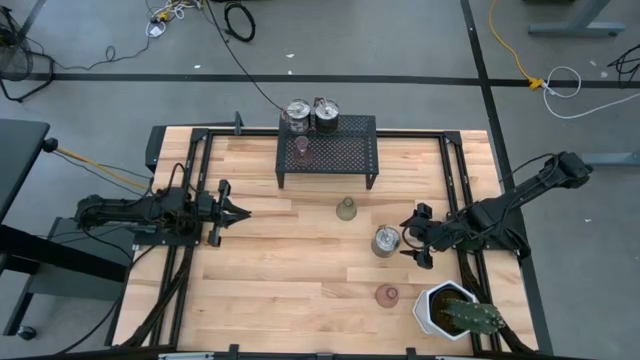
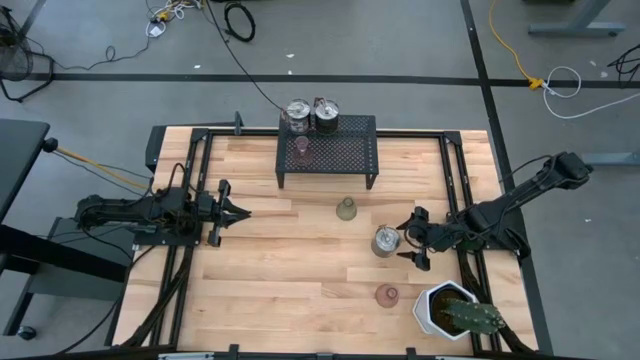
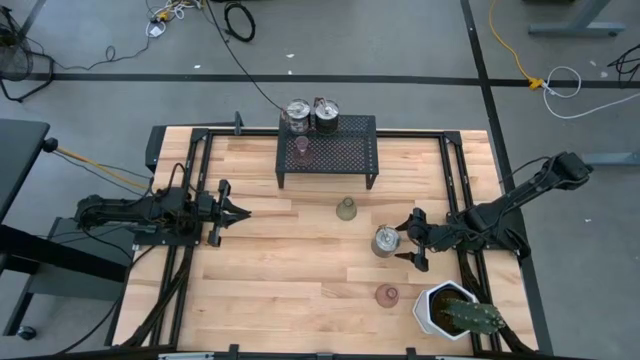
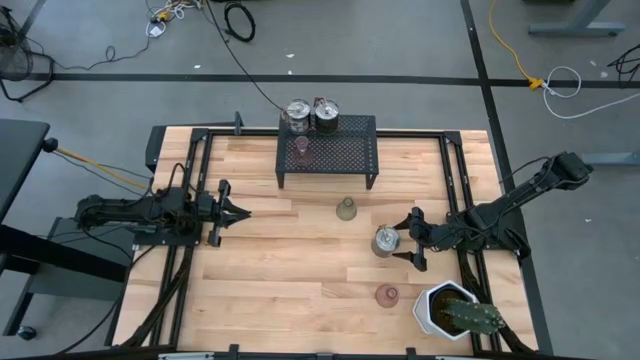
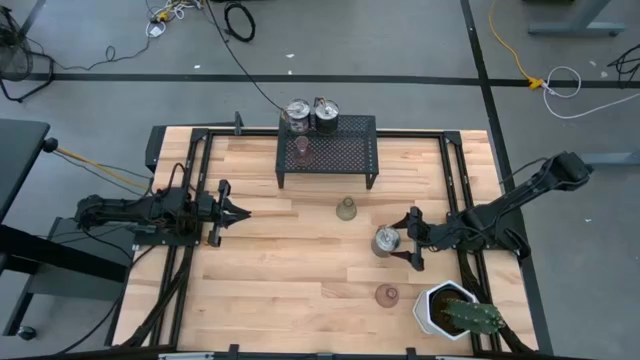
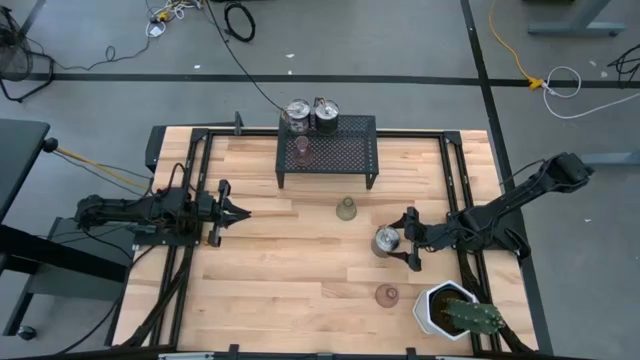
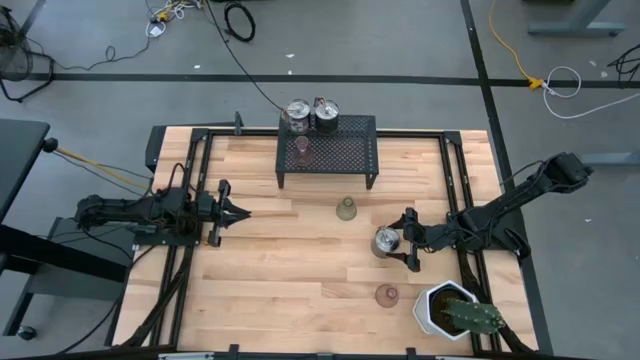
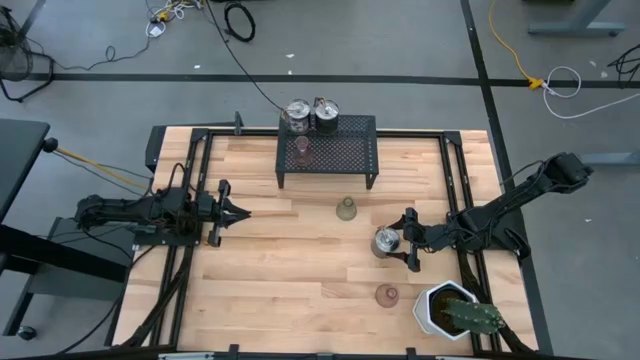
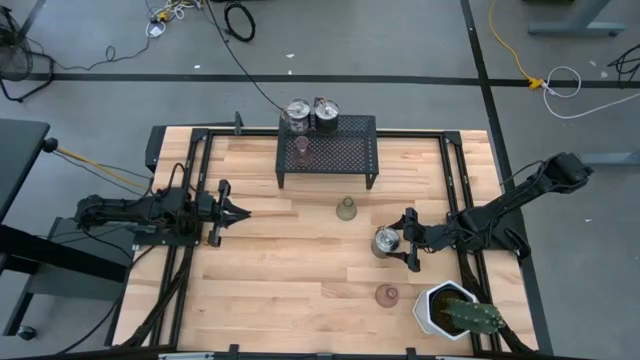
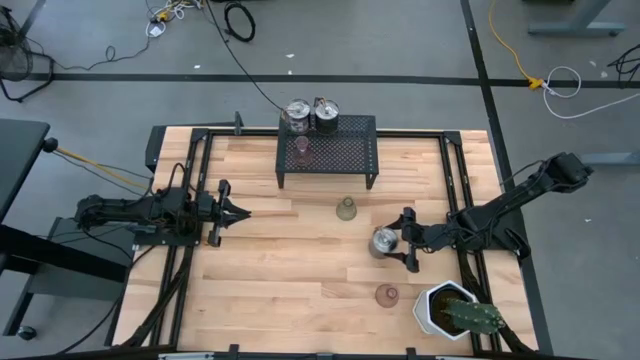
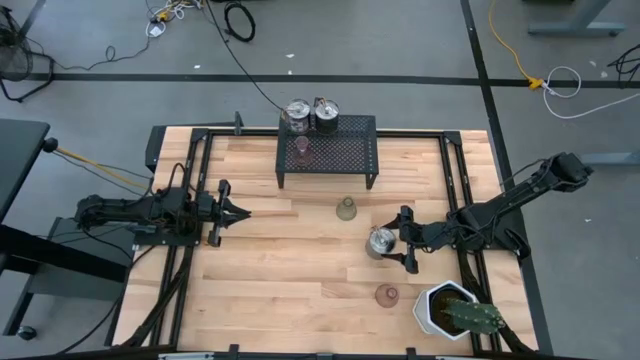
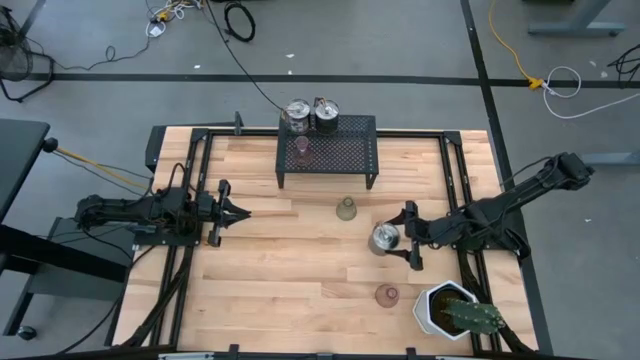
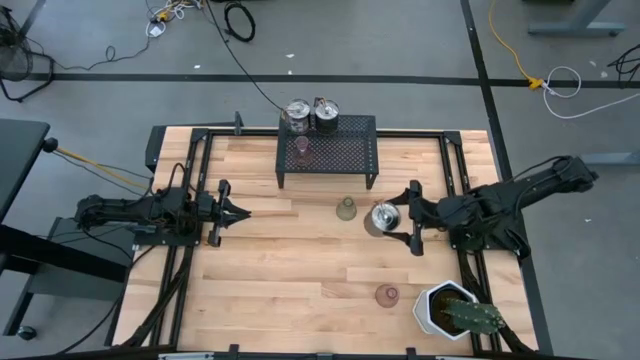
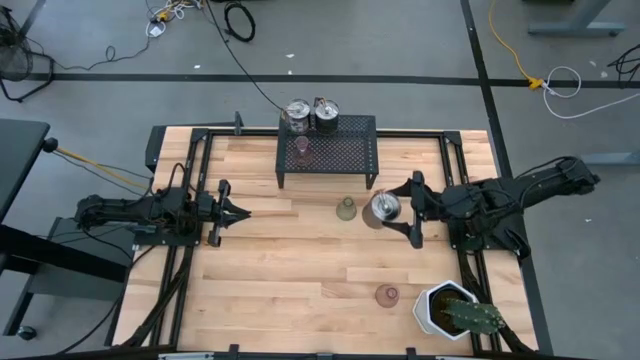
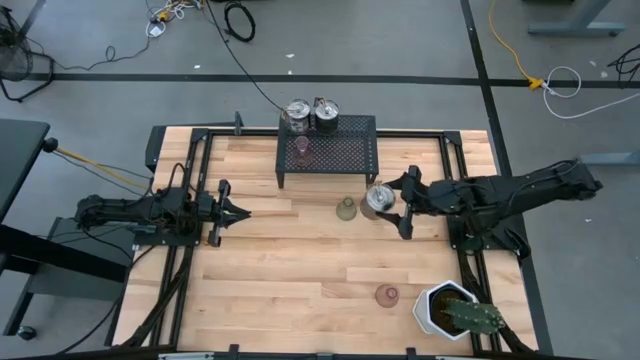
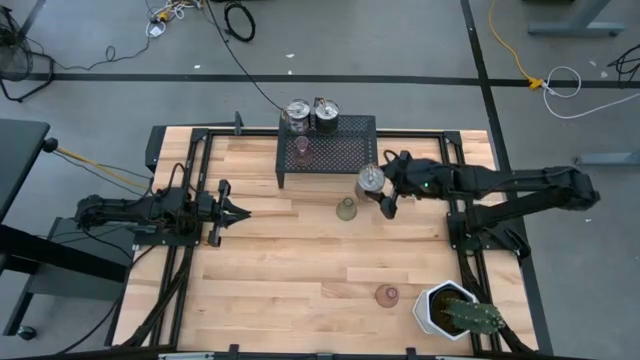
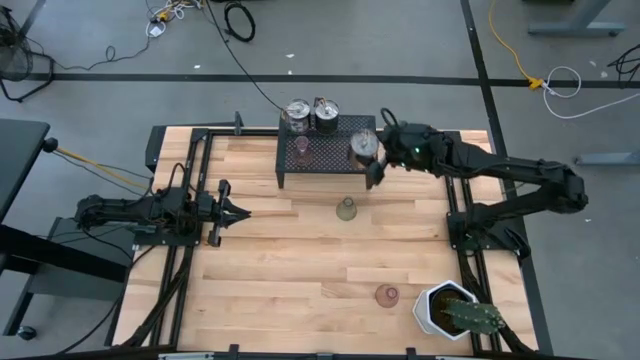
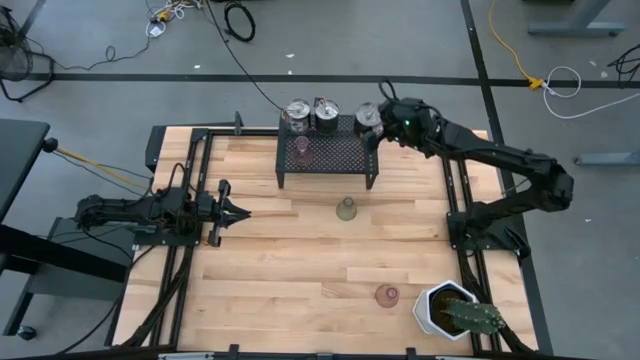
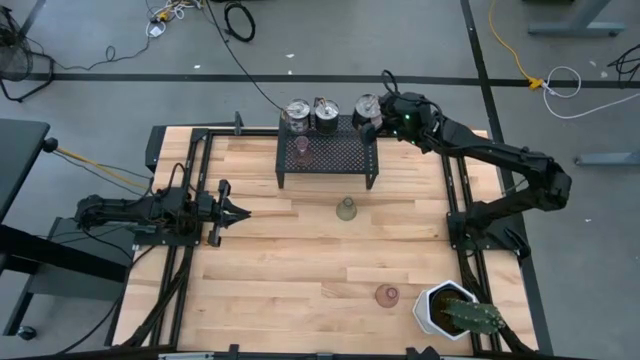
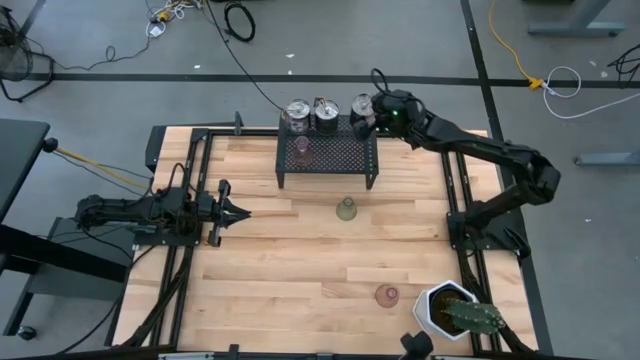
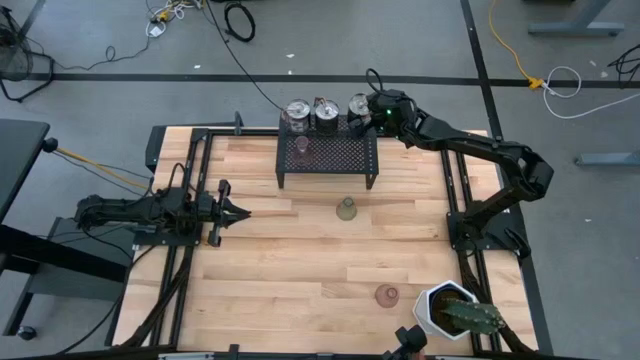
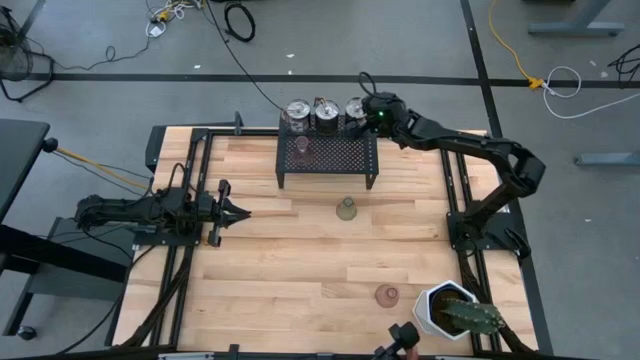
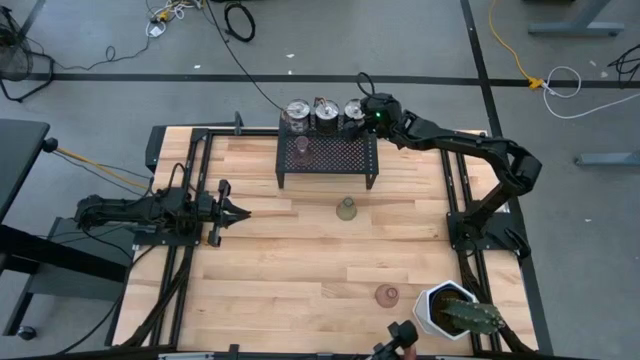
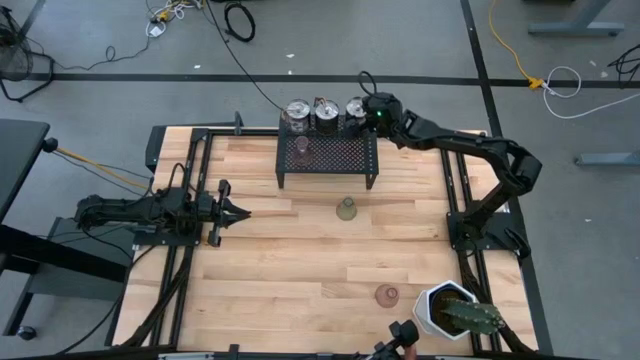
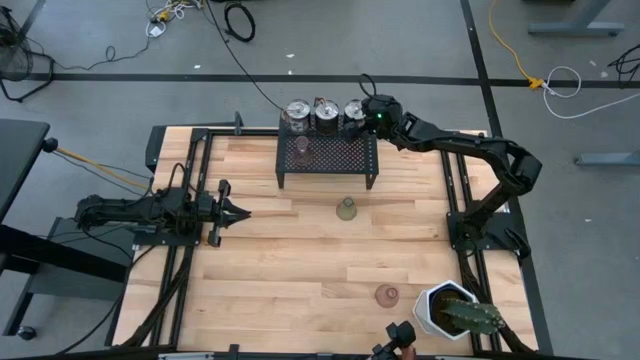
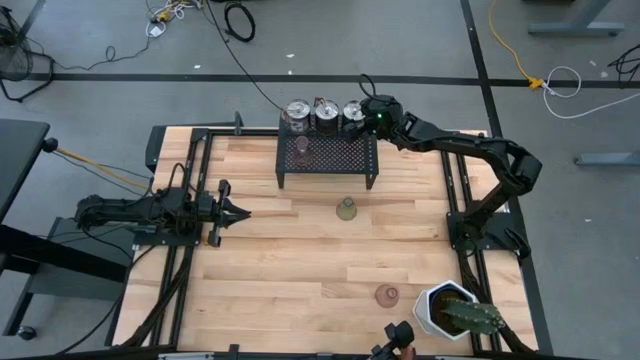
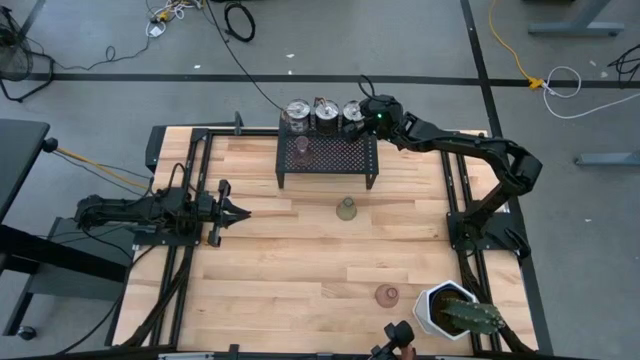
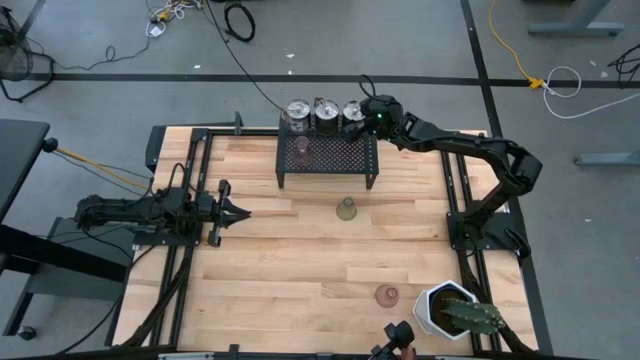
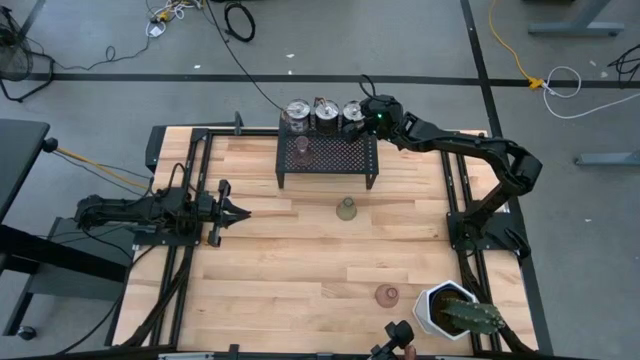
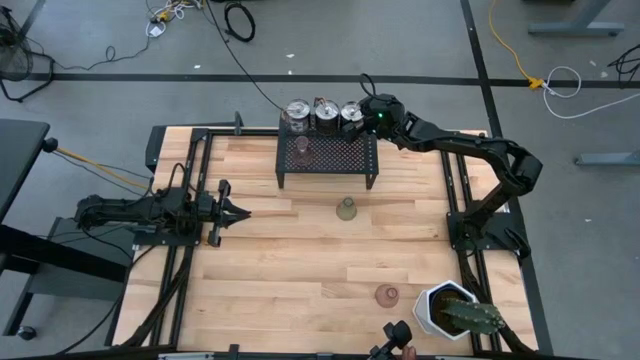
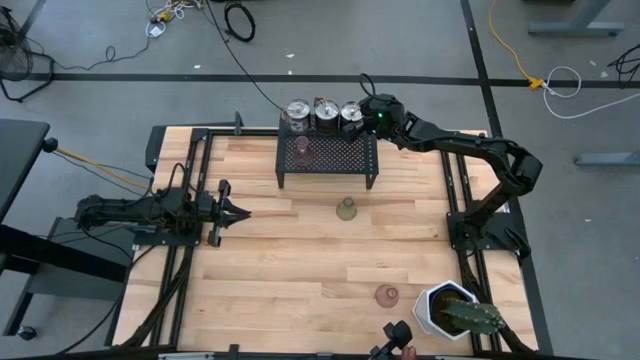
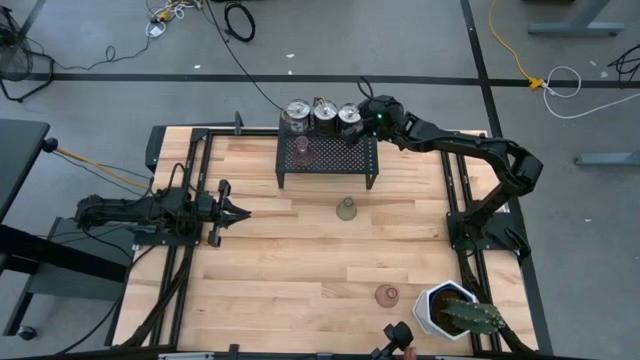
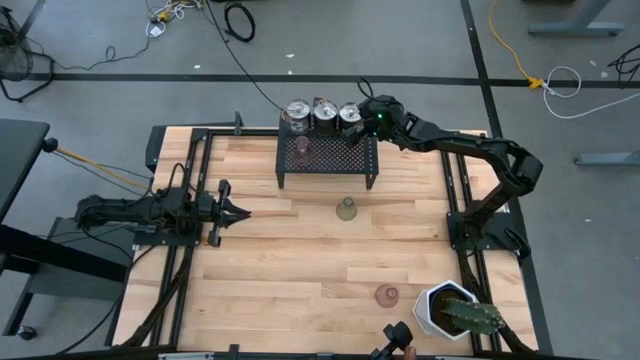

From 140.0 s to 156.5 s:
Task: Pick & Place candle stick holders
Put the silver scented candle on the shelf

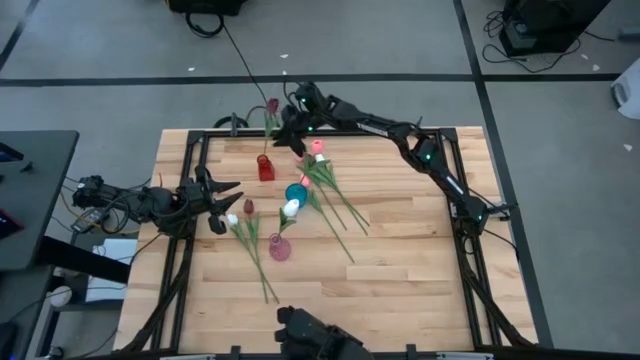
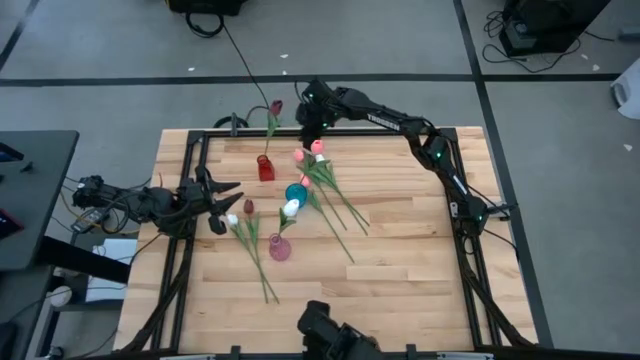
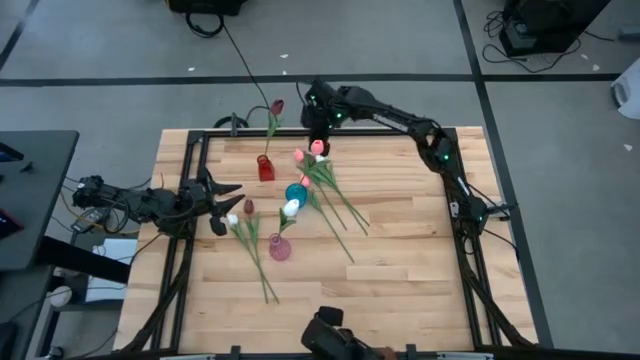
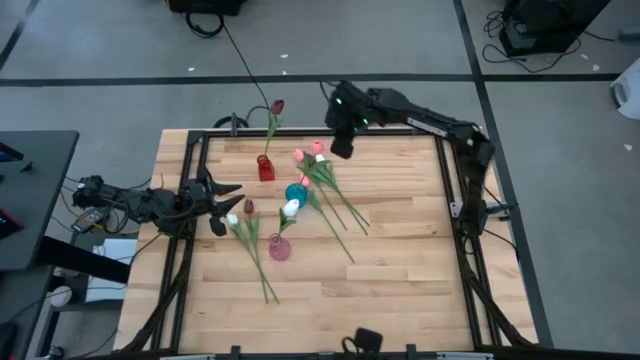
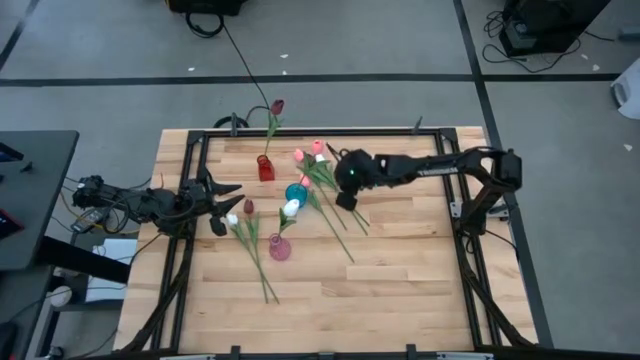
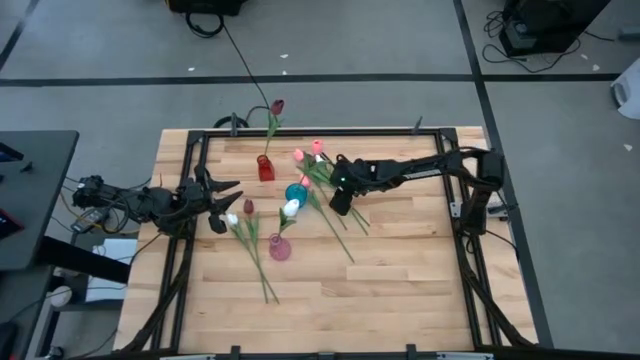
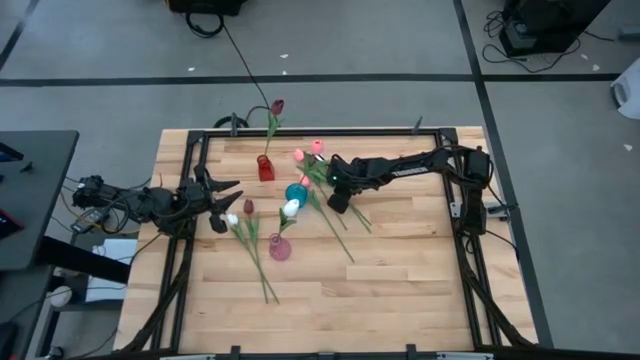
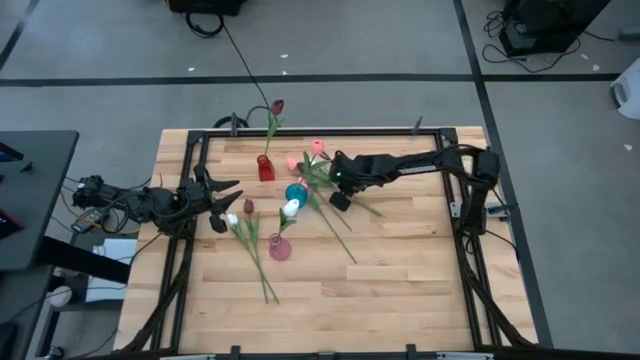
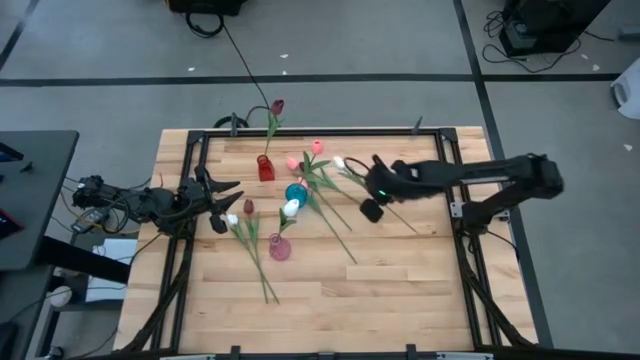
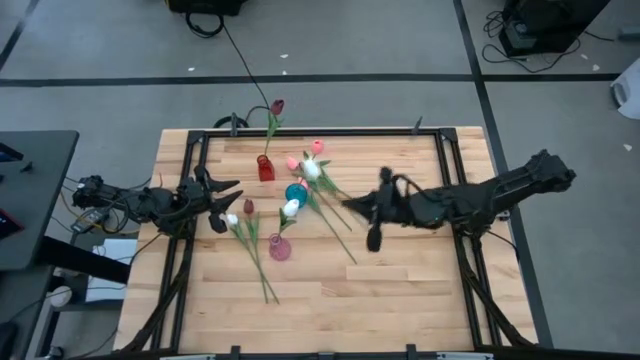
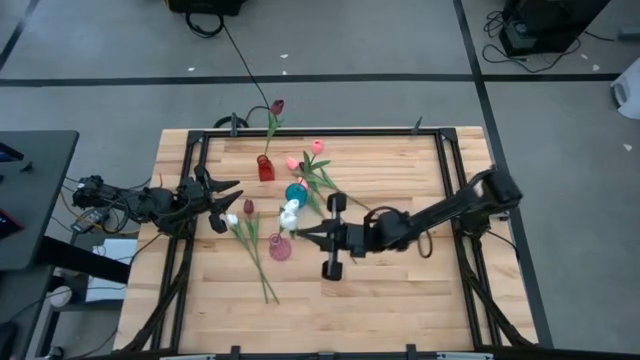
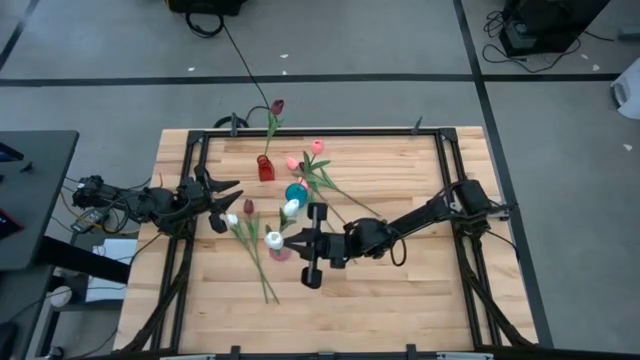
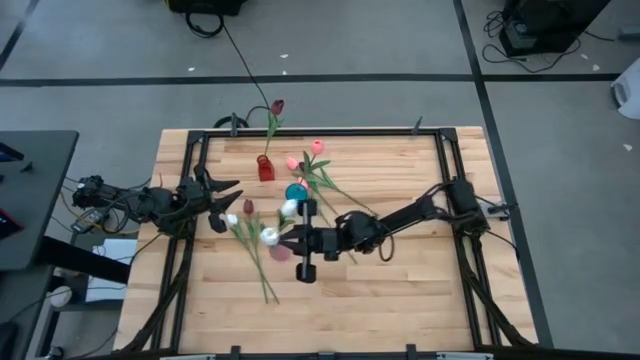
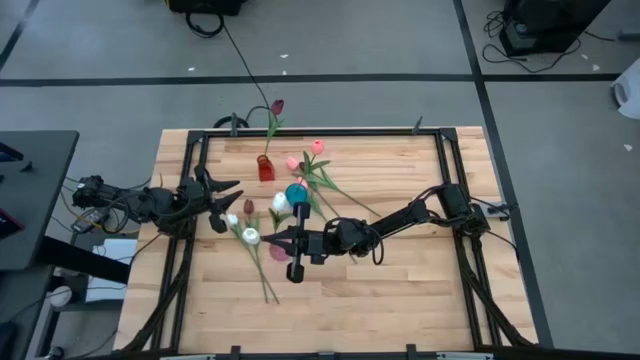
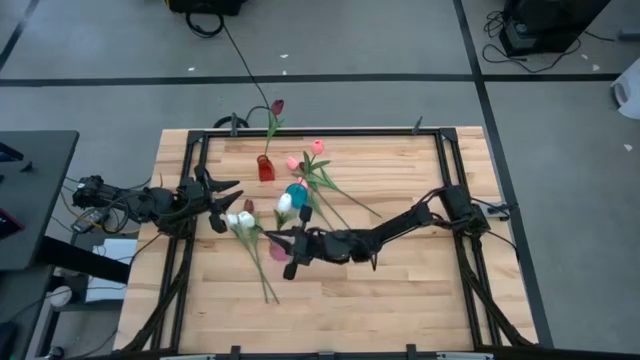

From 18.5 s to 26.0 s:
Task: Sort flowers into vase by color
Put the right white tulip into the pink vase
